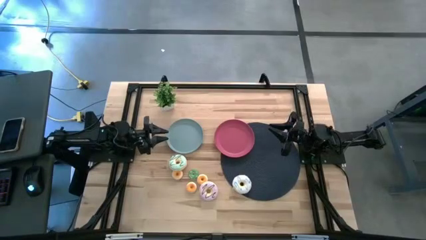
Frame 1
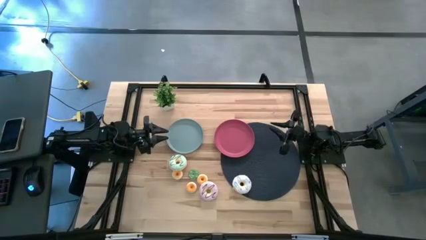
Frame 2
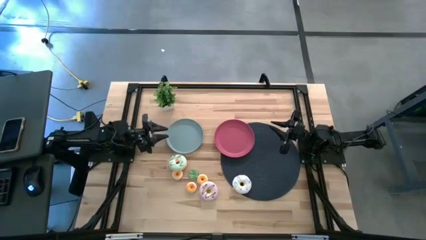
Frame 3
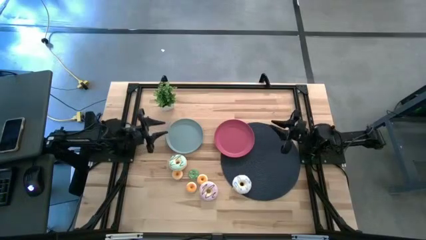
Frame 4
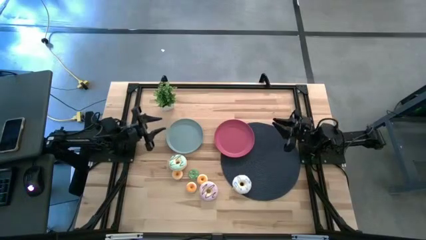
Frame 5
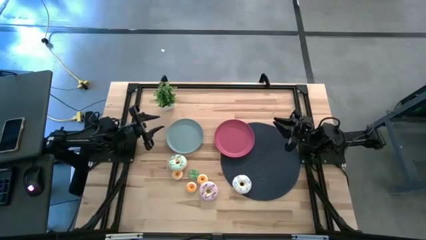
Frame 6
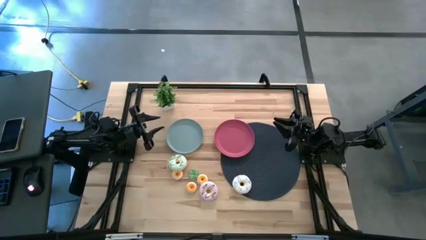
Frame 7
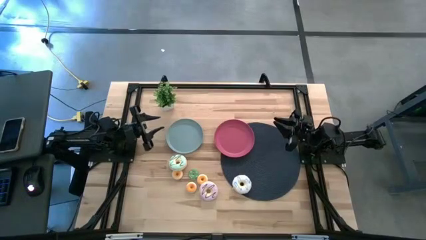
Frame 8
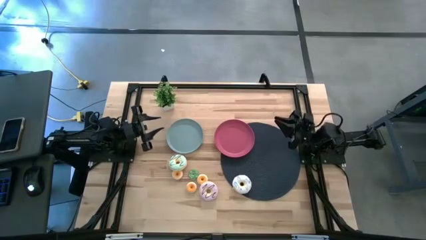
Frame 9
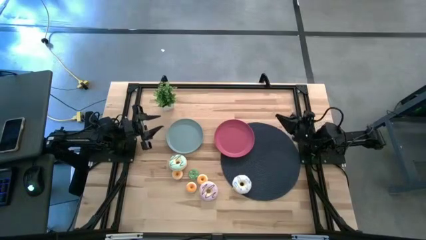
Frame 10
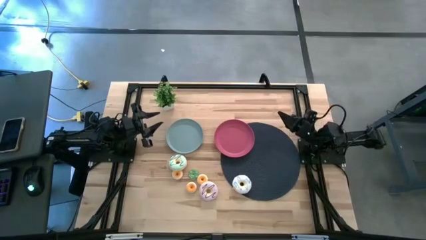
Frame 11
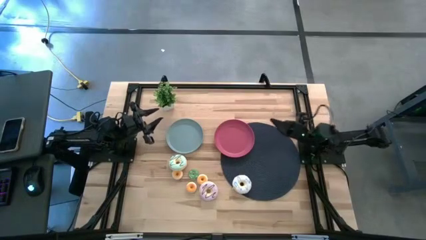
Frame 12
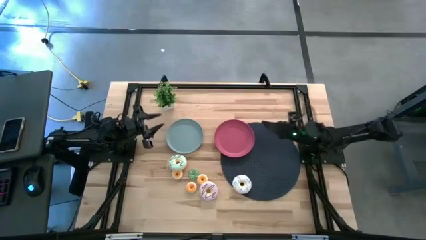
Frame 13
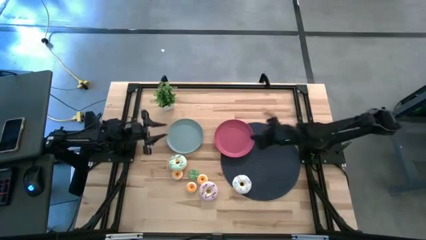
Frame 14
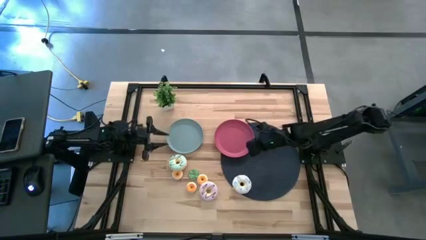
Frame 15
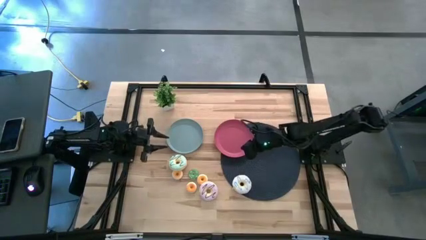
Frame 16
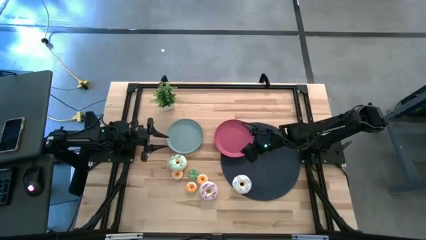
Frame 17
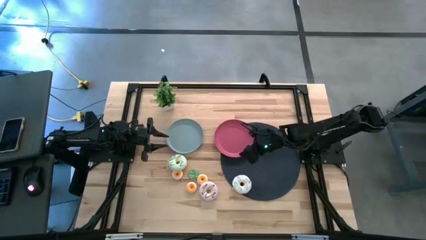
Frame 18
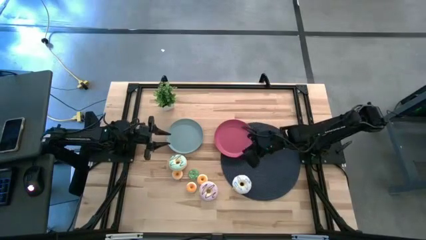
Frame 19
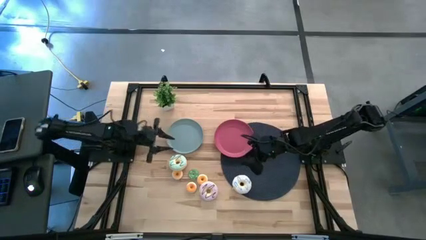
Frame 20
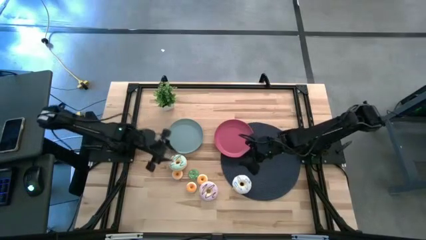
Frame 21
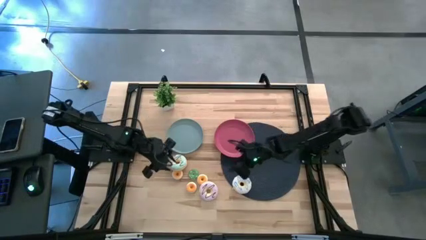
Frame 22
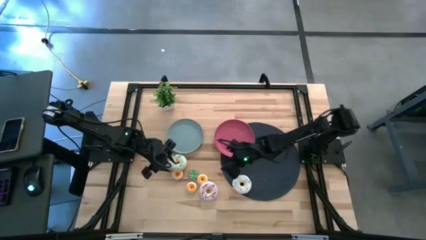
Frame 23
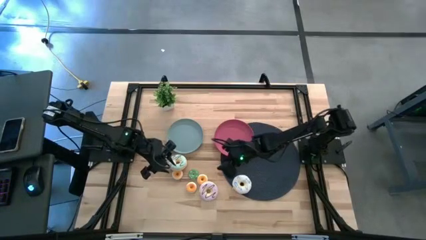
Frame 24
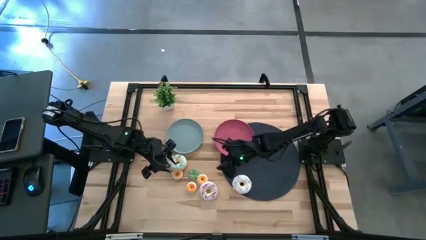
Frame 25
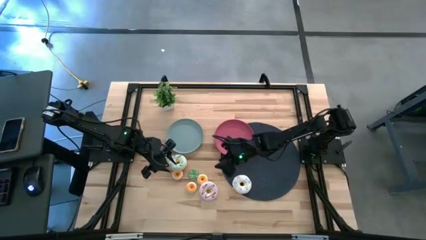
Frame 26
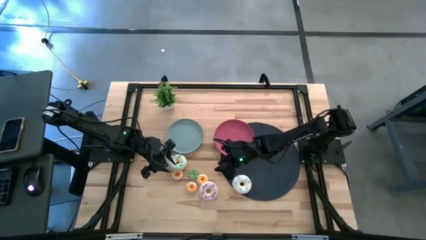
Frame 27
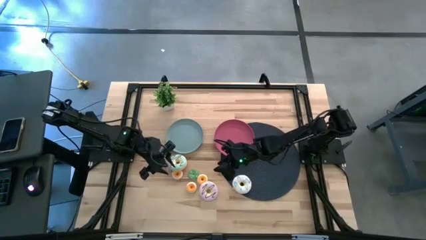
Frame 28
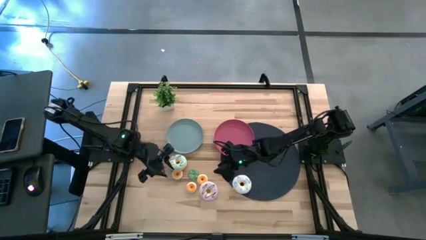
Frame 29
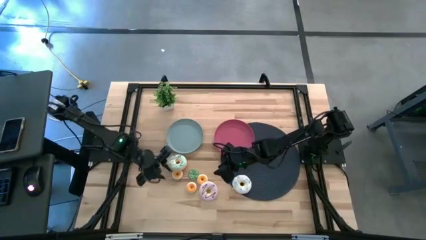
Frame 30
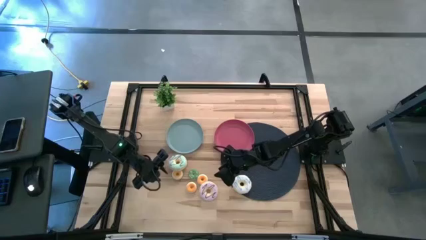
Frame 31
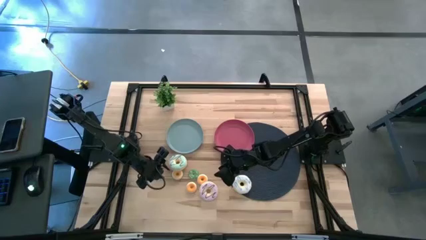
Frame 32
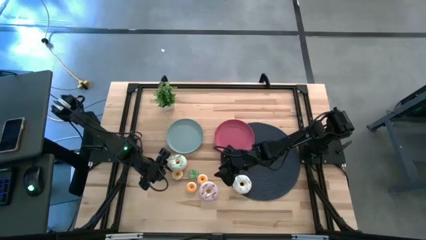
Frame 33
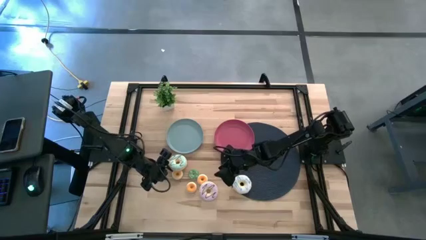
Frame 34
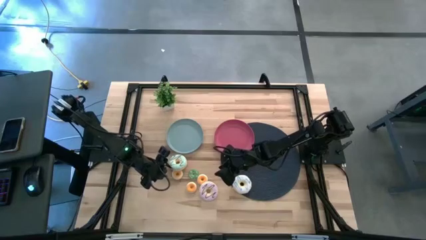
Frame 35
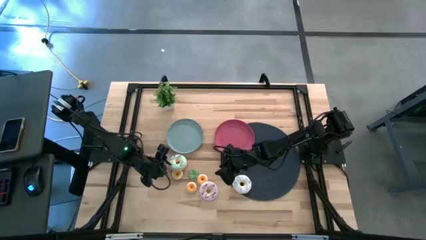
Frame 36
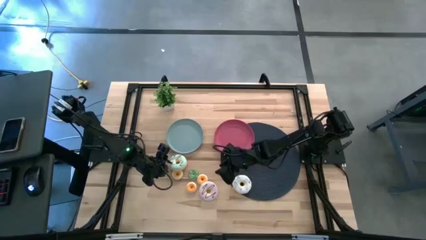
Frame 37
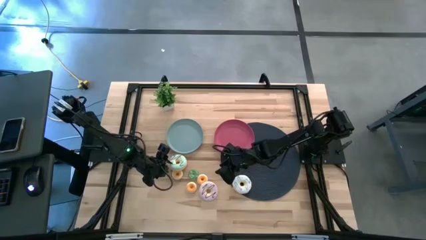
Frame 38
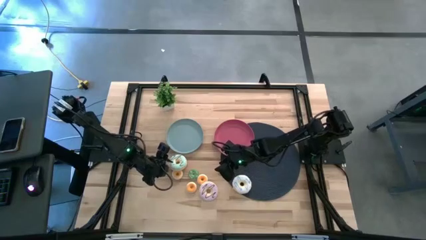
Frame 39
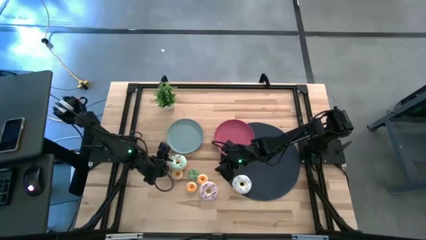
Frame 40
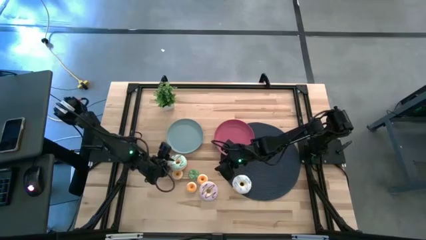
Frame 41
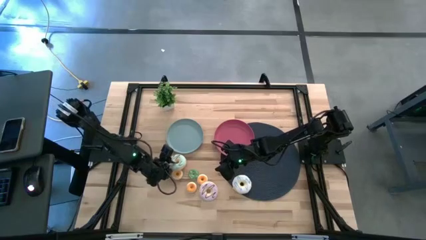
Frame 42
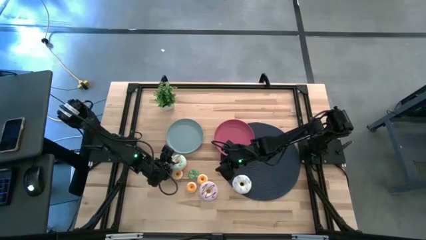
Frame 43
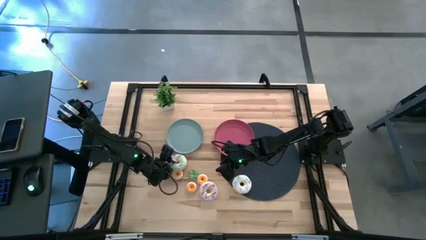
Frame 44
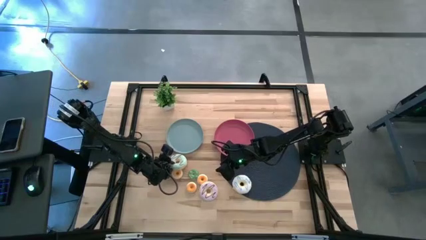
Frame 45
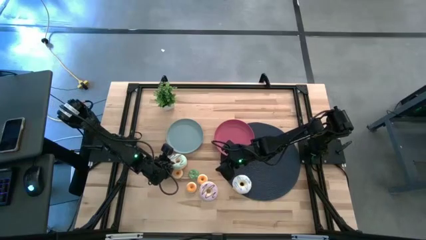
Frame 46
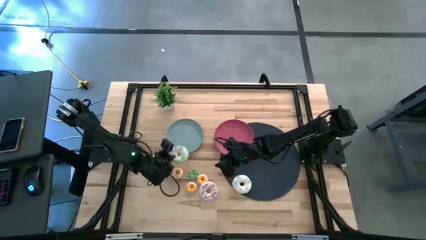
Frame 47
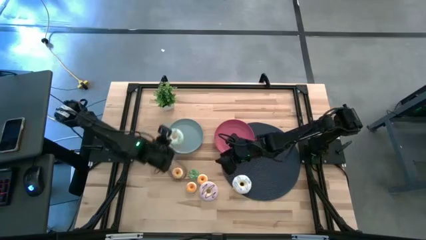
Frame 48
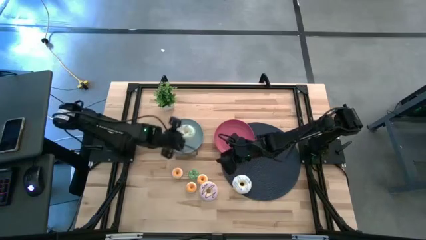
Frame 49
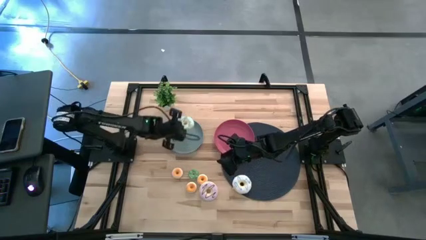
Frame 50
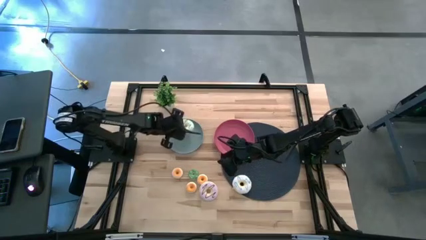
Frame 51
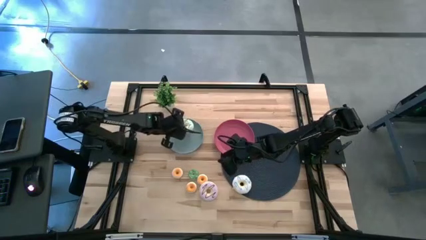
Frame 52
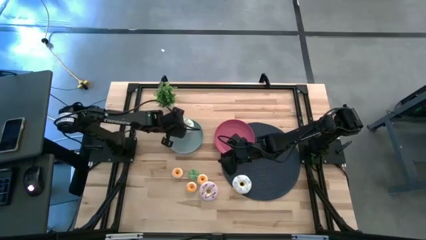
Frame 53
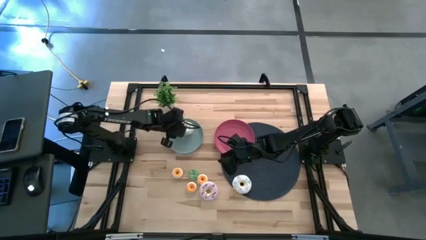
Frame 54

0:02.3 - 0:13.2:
Task: Pick & Place donuts
Put the large green donut on the gray plate

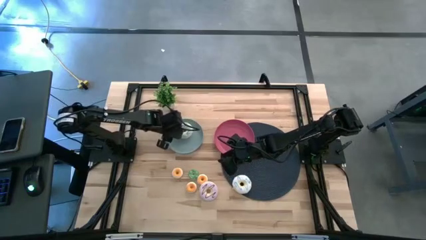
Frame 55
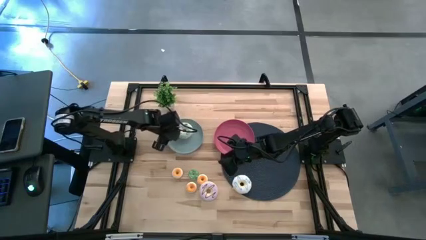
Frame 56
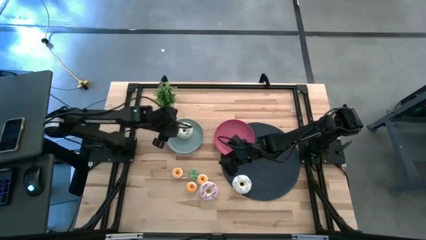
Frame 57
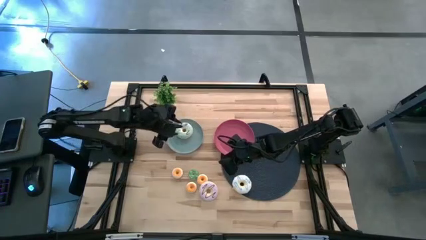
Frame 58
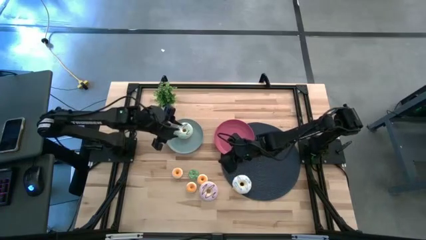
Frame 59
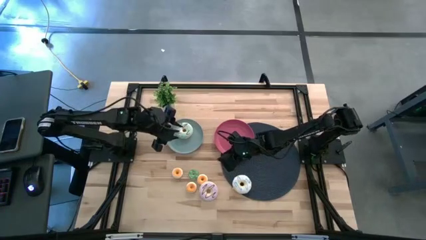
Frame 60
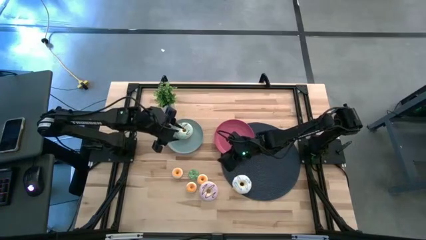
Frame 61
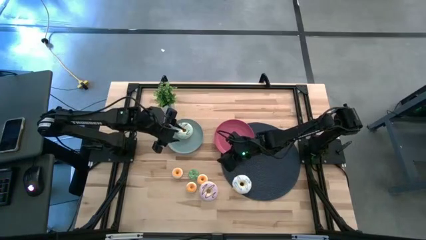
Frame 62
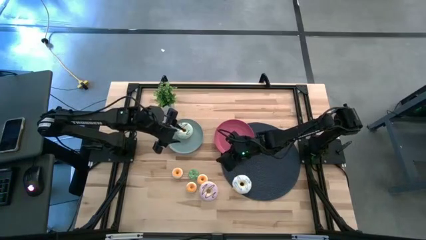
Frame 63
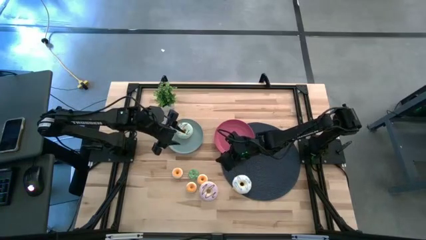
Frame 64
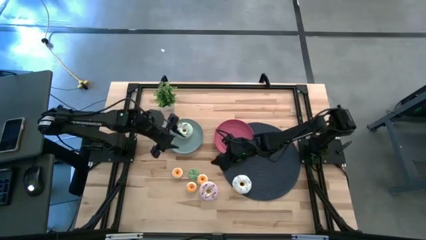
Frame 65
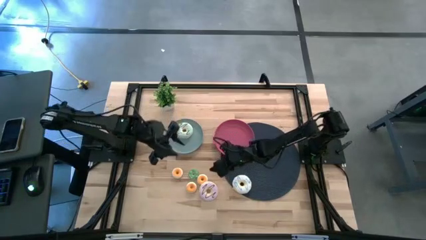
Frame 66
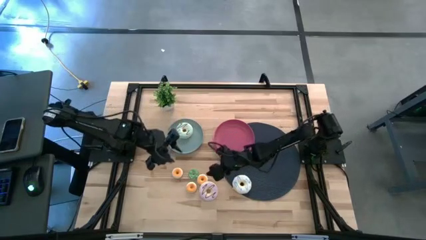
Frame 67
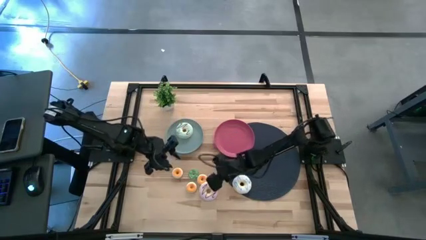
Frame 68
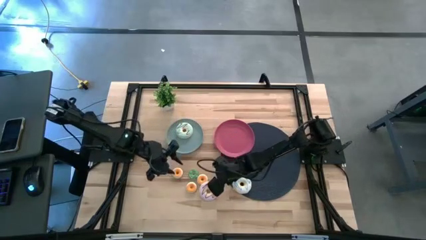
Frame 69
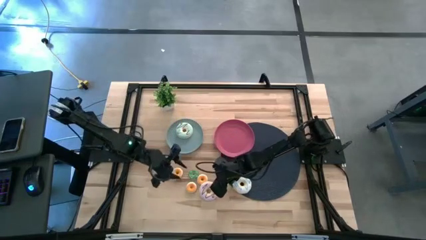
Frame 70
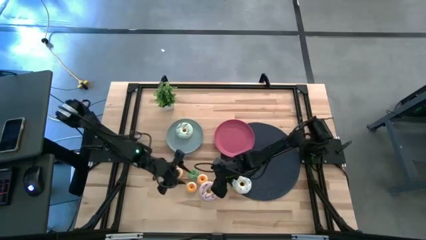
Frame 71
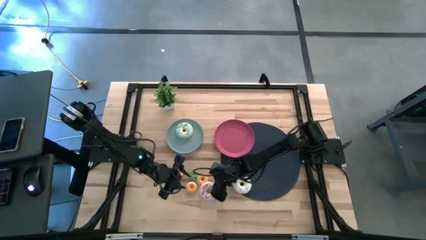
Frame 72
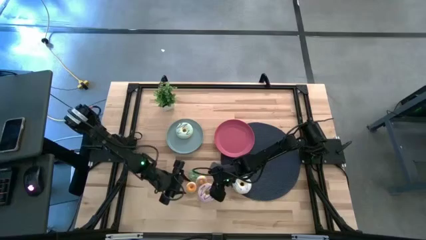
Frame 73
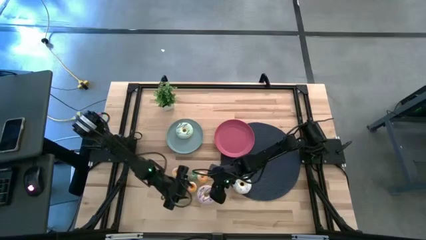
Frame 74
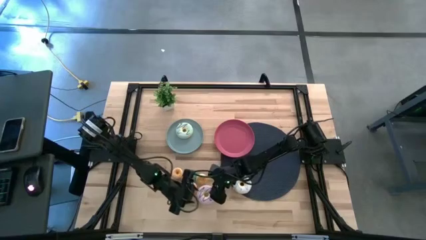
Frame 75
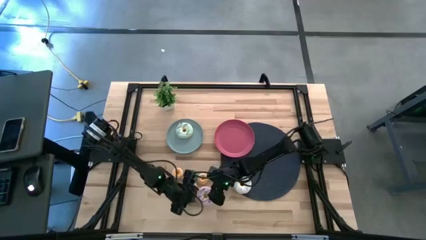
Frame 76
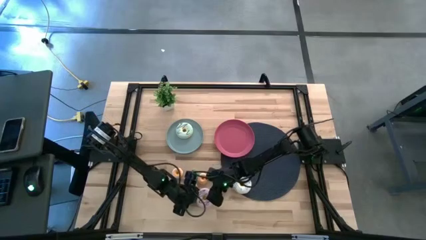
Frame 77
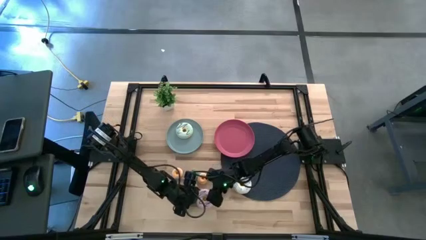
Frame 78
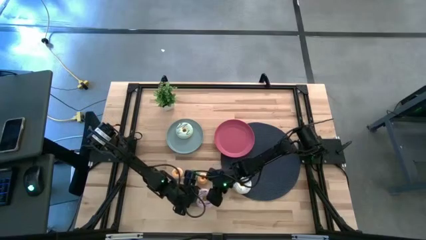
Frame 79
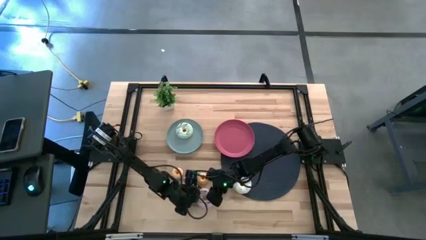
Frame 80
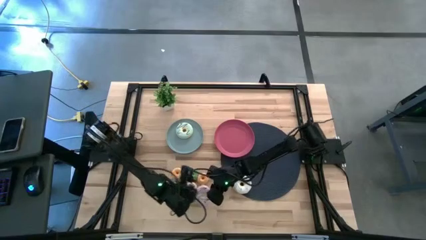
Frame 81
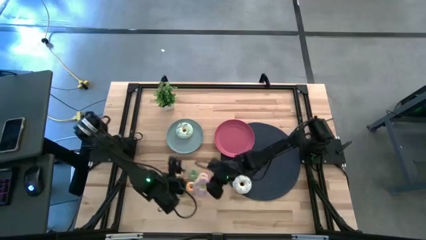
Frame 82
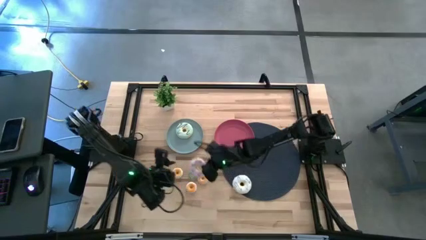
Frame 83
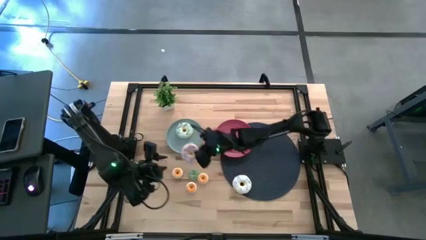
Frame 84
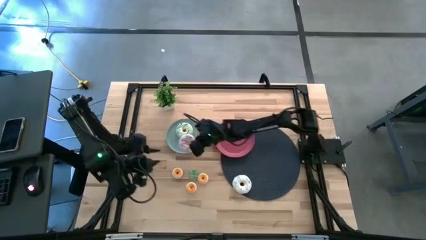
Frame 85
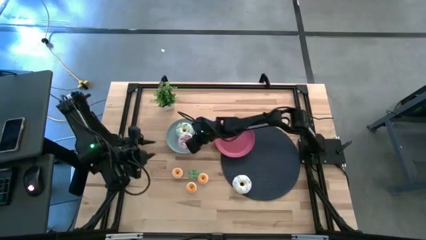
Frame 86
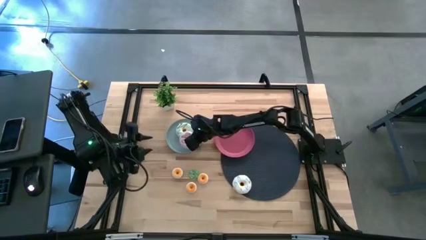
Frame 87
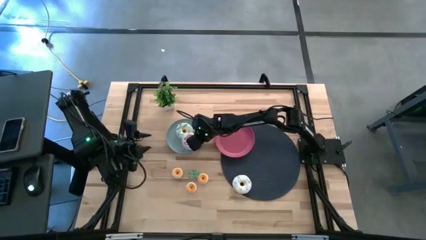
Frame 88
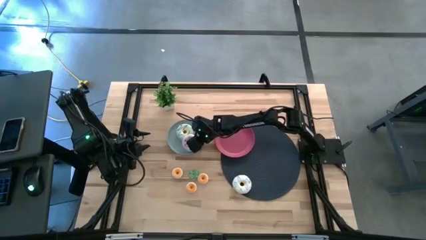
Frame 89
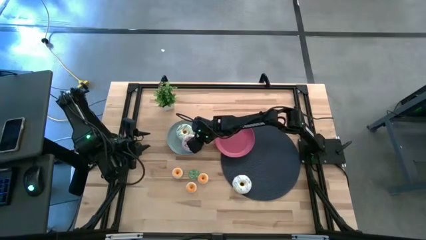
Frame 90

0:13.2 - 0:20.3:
Put the large purple donut on the gray plate
